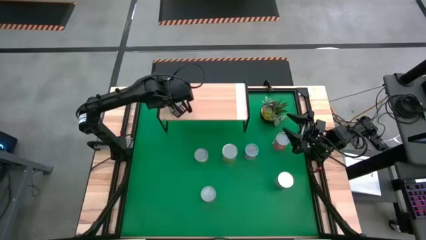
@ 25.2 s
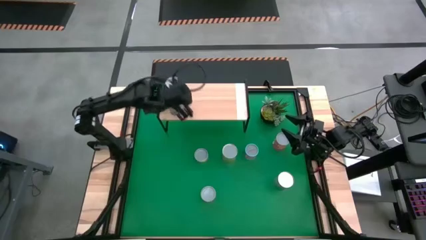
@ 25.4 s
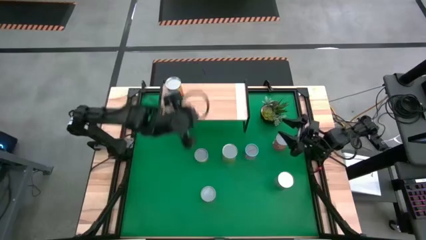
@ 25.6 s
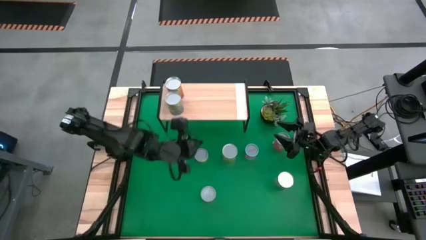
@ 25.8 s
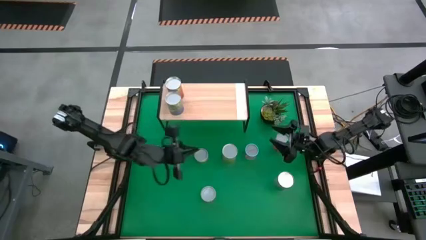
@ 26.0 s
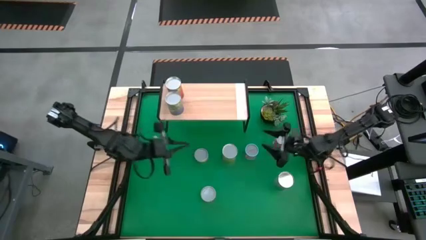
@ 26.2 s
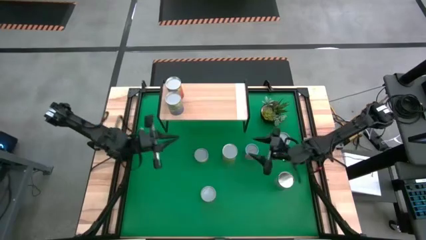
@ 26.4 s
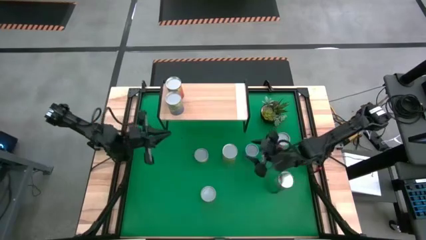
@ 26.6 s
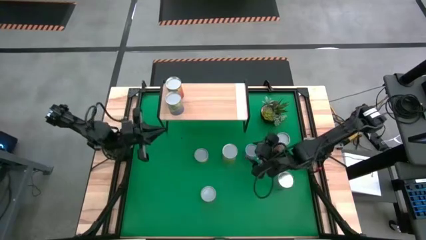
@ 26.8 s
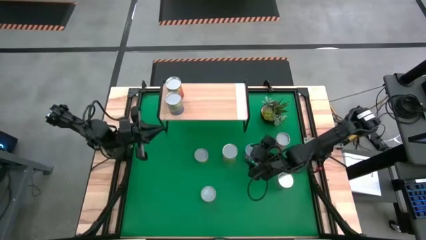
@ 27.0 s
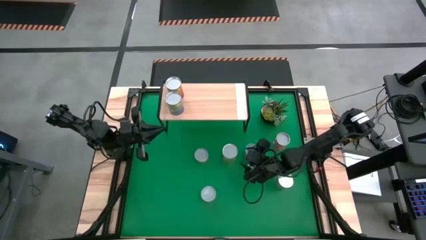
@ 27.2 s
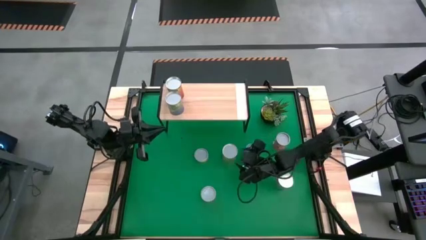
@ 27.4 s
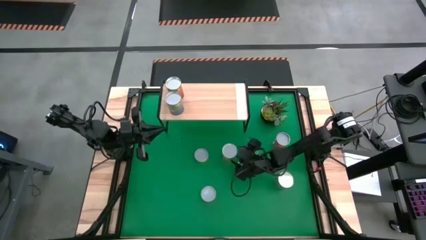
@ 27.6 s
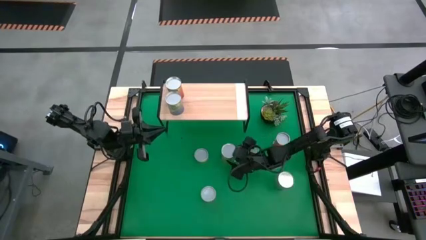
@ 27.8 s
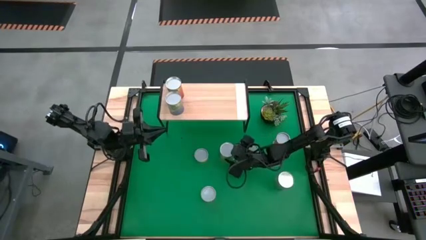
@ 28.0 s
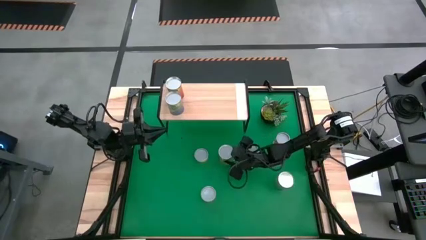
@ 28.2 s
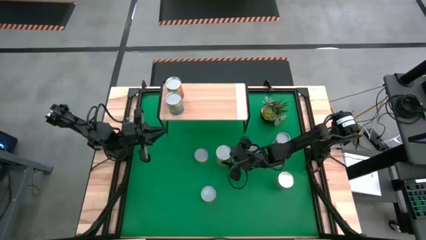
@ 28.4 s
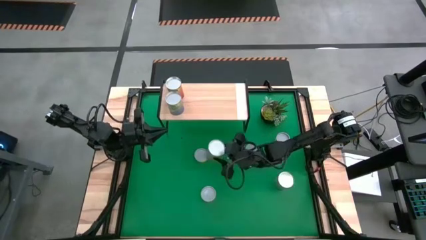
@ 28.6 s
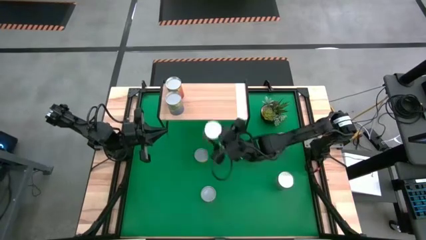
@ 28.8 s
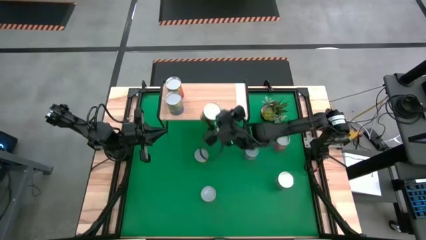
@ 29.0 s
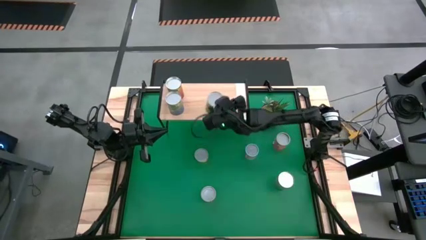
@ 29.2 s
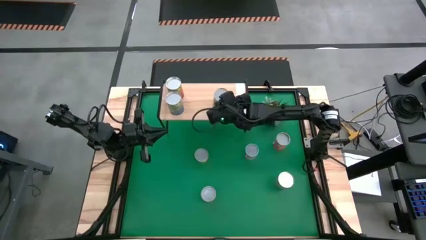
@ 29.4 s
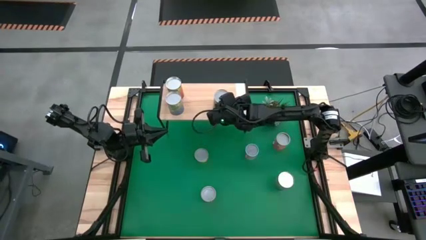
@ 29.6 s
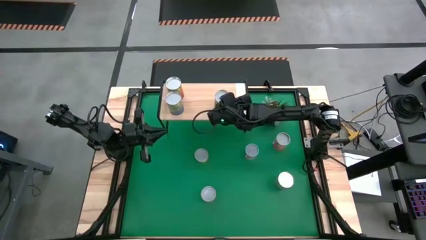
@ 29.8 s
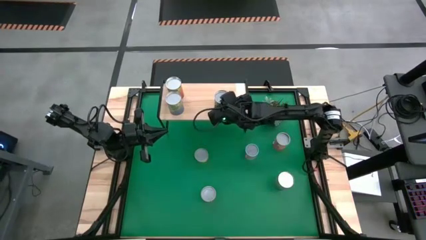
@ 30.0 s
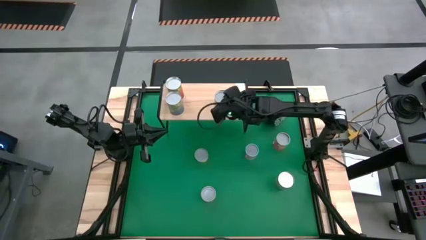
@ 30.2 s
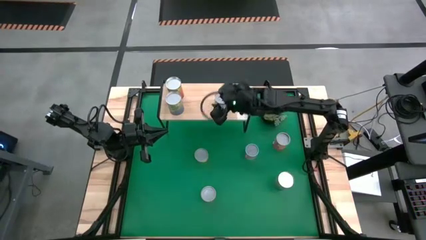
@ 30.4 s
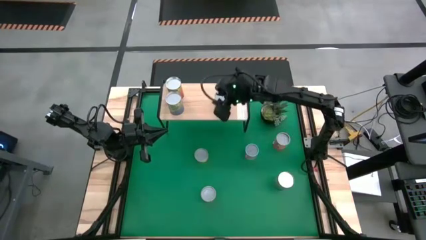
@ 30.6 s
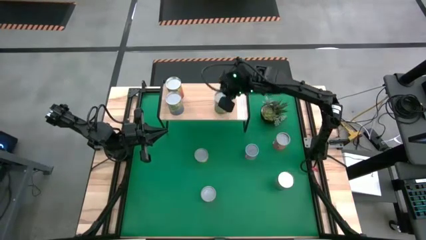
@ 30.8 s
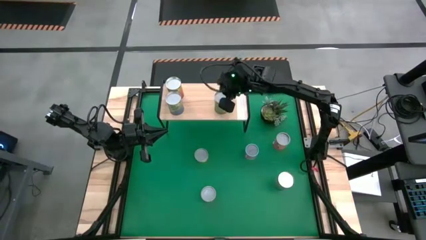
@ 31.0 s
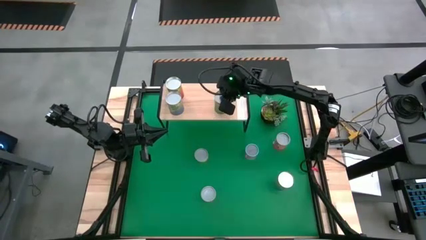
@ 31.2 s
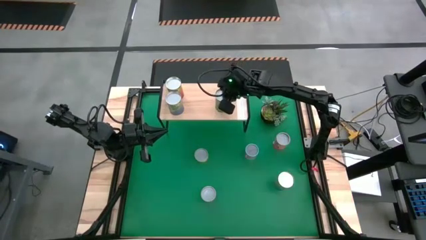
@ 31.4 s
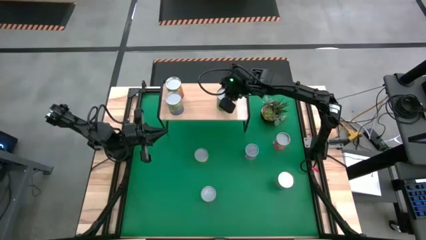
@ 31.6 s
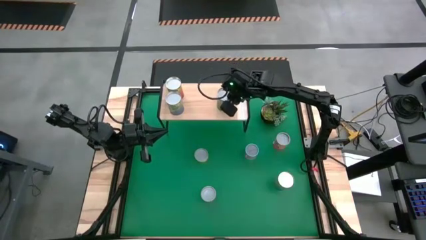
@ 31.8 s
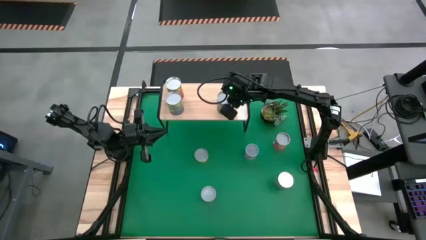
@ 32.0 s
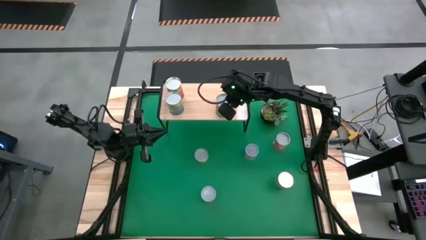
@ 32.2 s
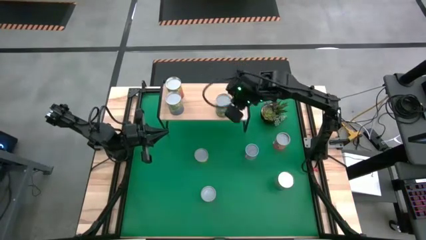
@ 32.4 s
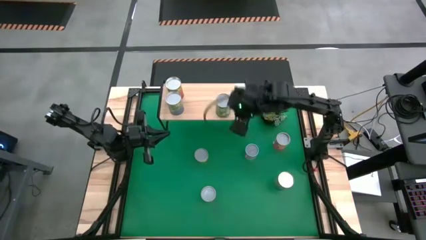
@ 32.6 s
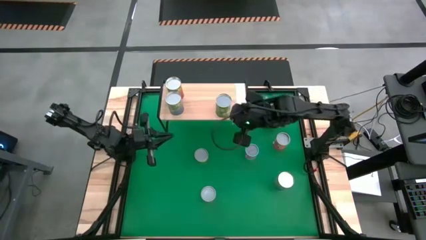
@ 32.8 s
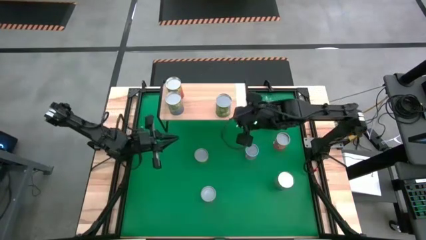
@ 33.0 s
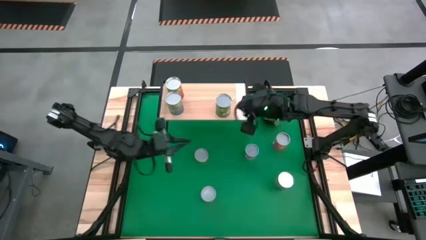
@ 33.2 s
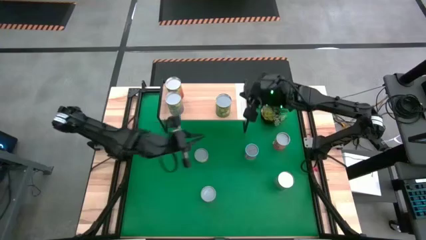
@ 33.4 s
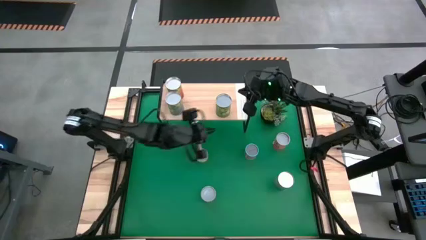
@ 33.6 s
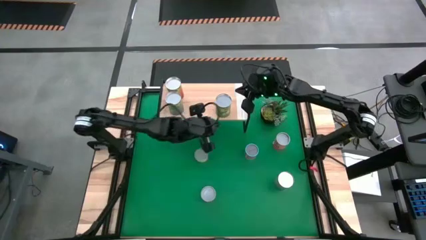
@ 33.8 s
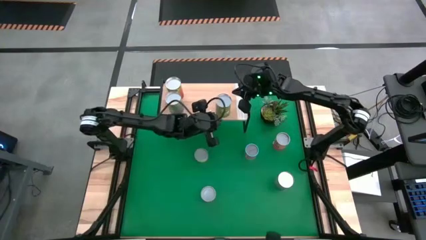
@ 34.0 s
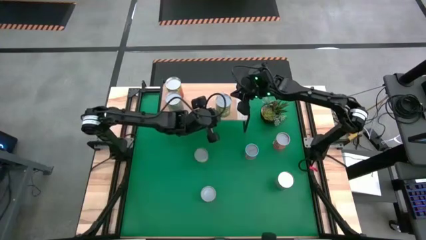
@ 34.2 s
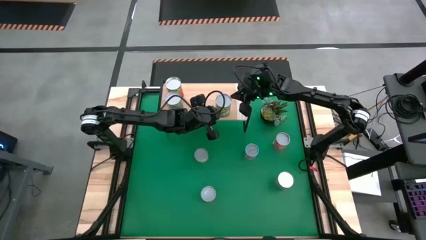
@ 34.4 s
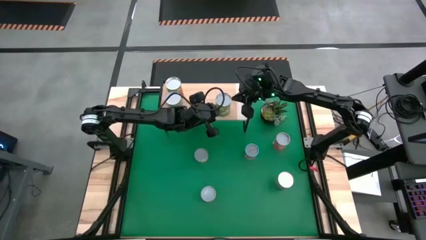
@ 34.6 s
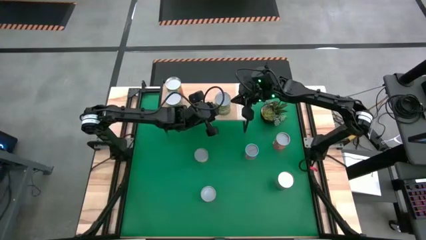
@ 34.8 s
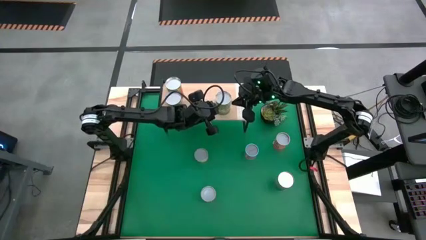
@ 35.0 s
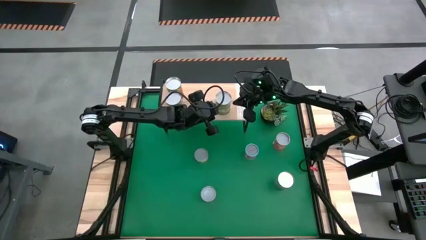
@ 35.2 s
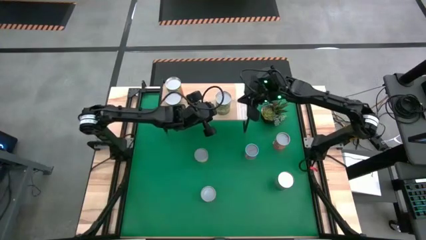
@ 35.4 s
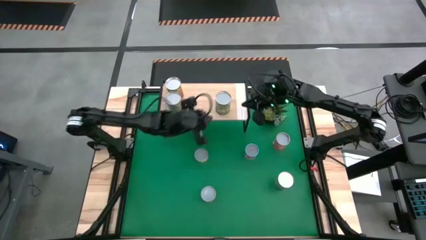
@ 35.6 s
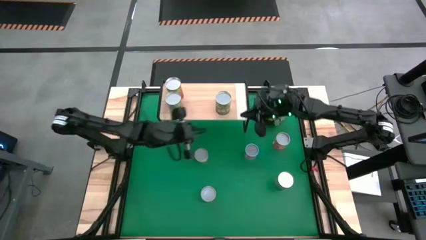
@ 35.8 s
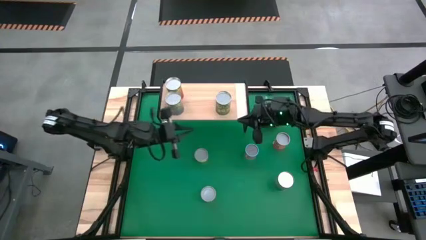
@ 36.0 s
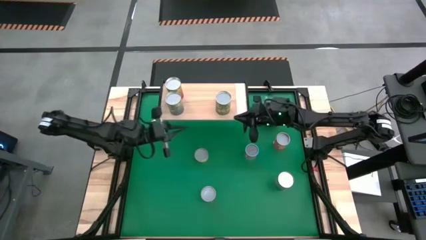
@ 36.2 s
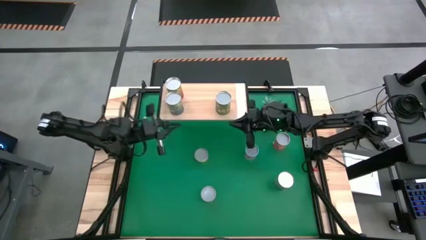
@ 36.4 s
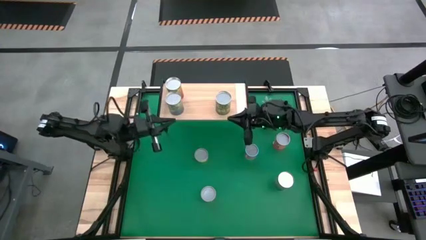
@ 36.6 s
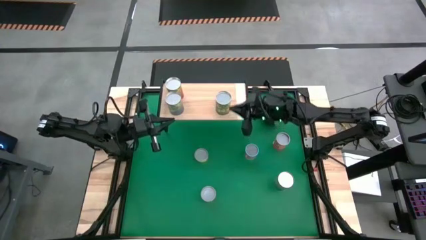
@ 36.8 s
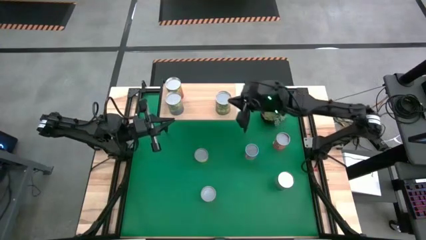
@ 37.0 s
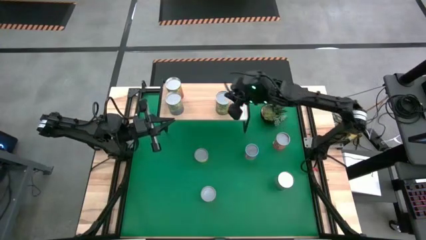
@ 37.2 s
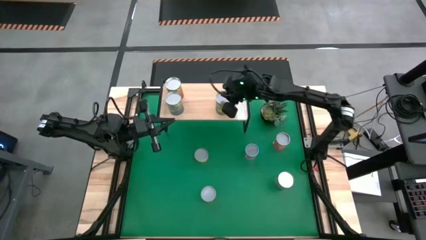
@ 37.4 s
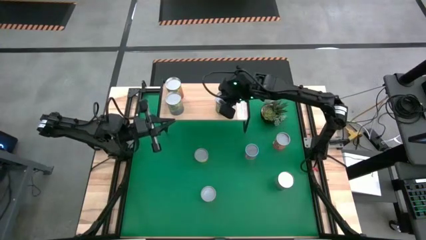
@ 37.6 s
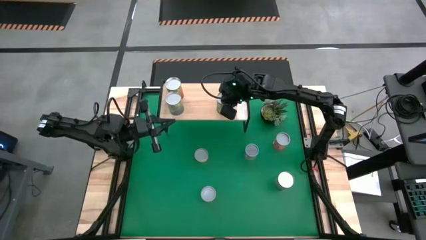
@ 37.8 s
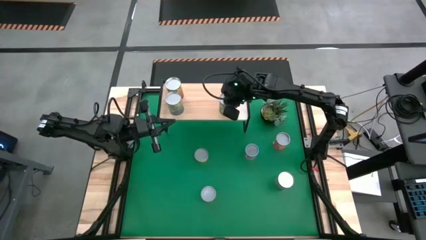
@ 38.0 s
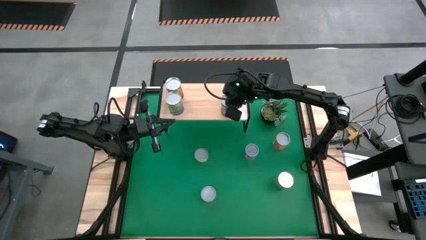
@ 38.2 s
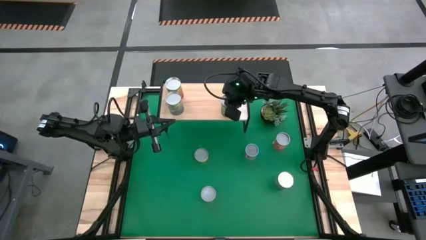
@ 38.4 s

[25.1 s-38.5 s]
Task: Pick and place cans onto a shelf
Put the big green can on the shelf
